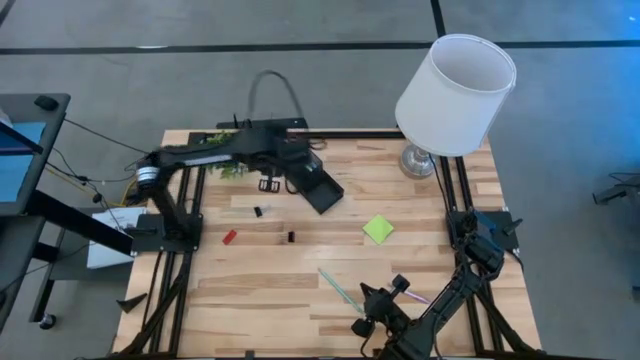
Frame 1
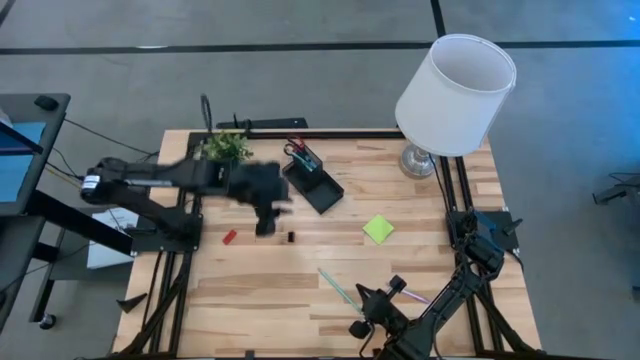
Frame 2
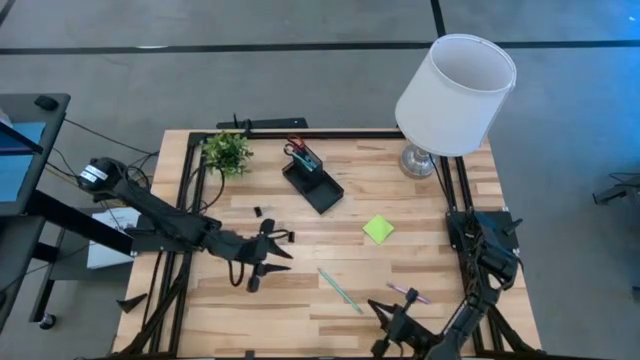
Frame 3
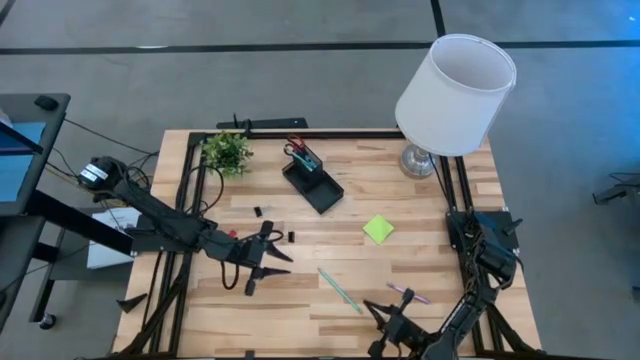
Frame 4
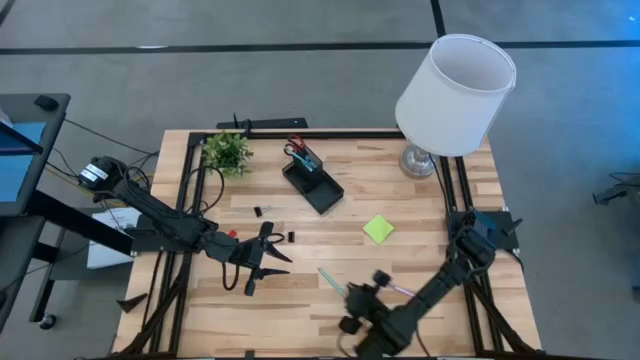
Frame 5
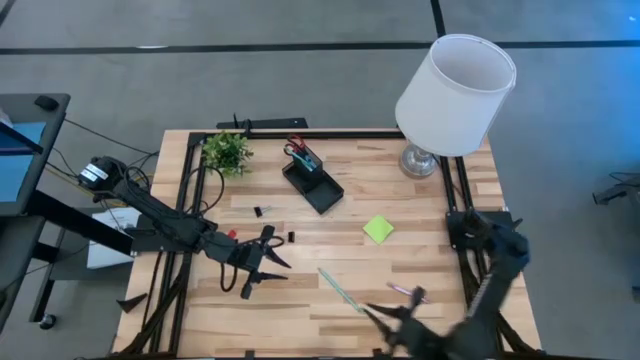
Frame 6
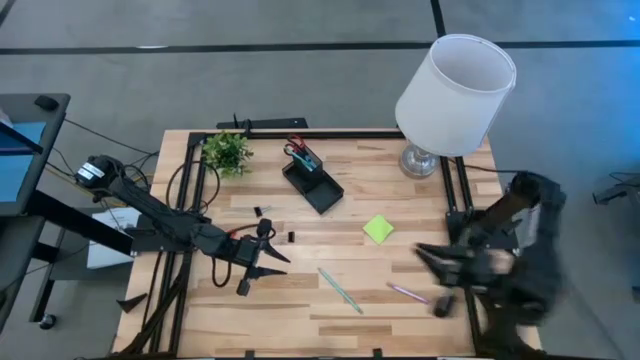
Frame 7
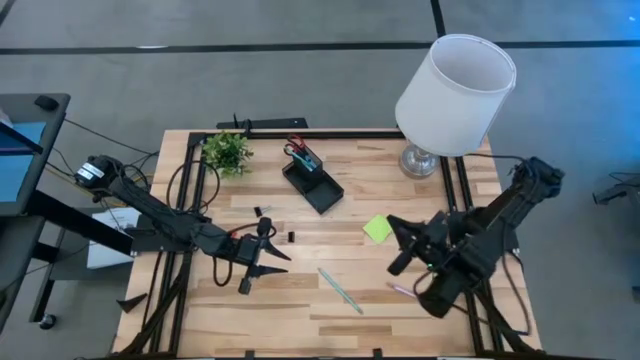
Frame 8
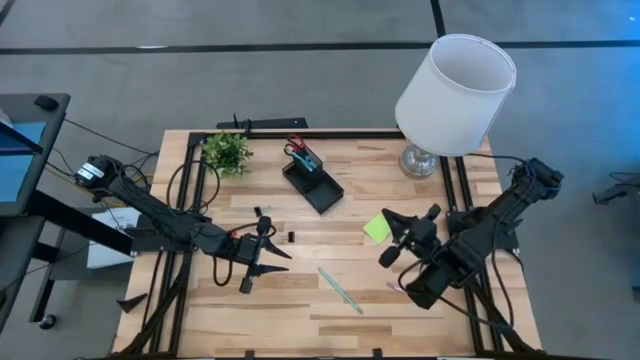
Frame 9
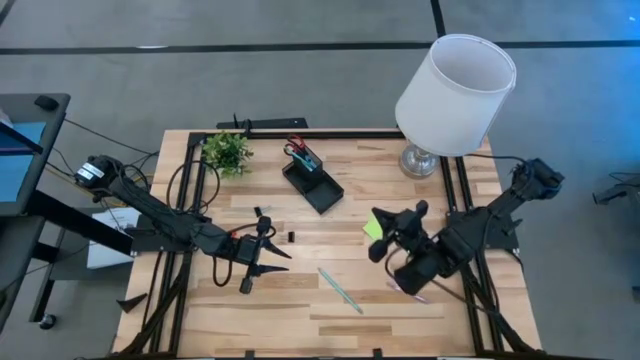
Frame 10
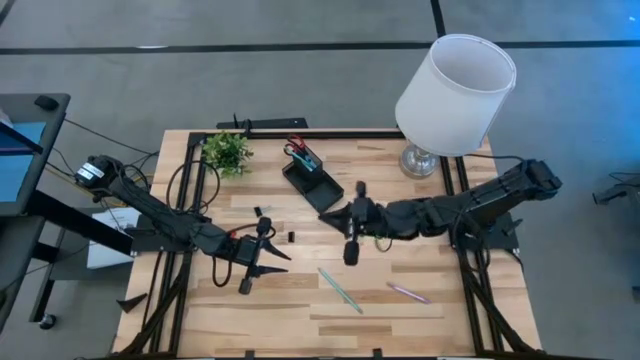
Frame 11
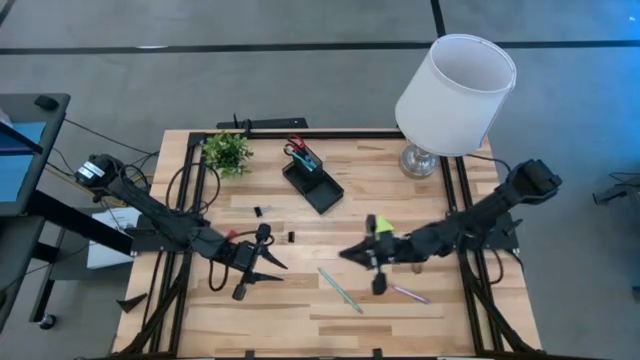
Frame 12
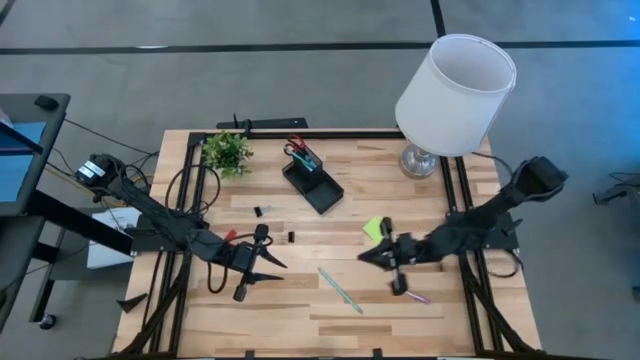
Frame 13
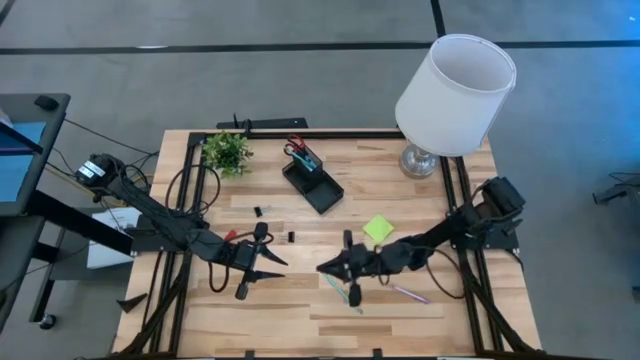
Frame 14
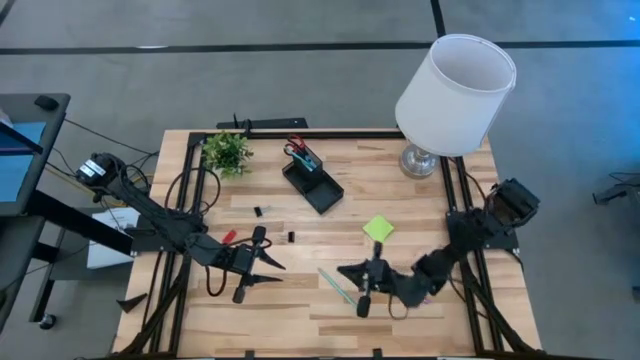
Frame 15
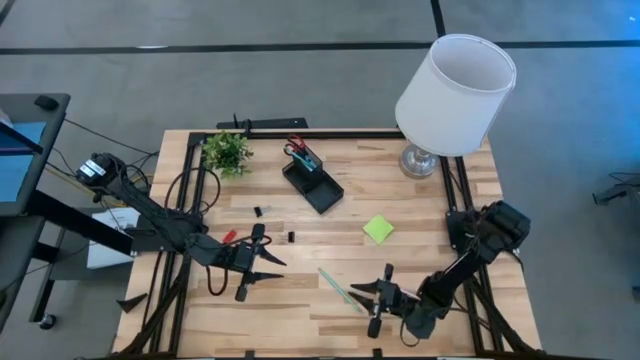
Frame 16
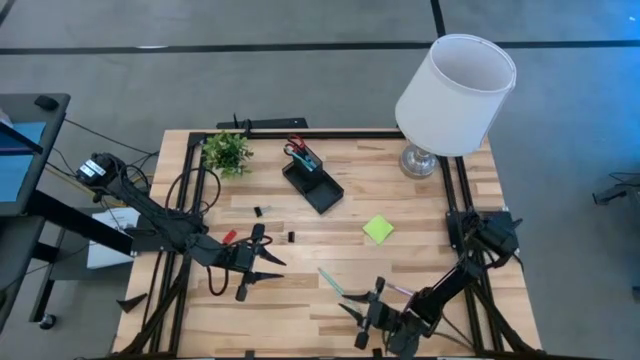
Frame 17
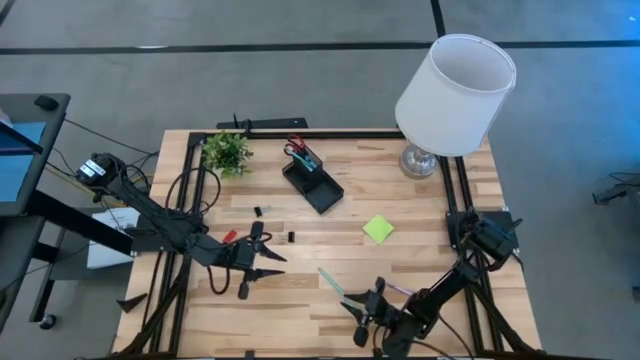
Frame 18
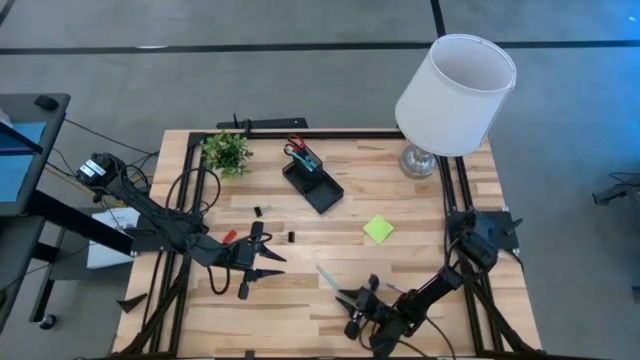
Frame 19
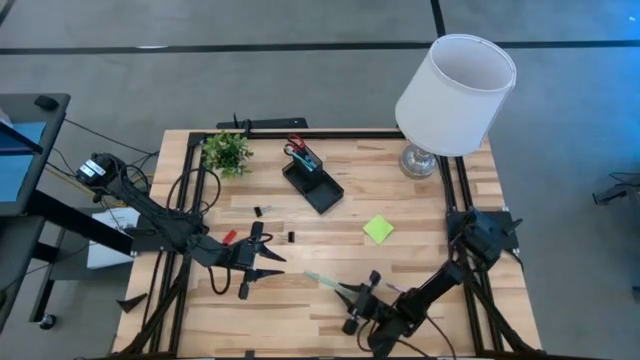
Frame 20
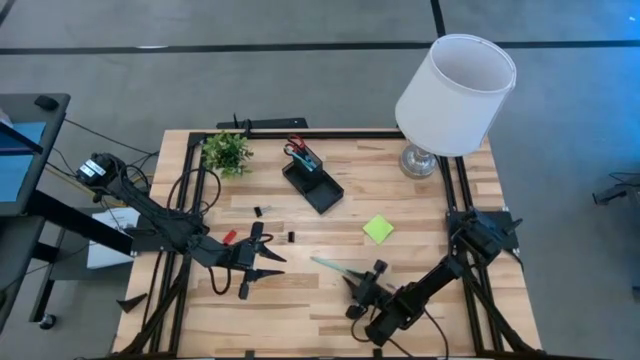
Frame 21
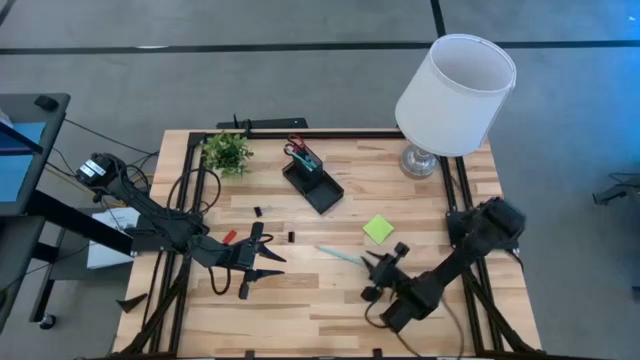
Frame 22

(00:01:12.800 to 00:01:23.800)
Task: Pick and place office supplies into organizer
Put the blue pencil into the desk organizer

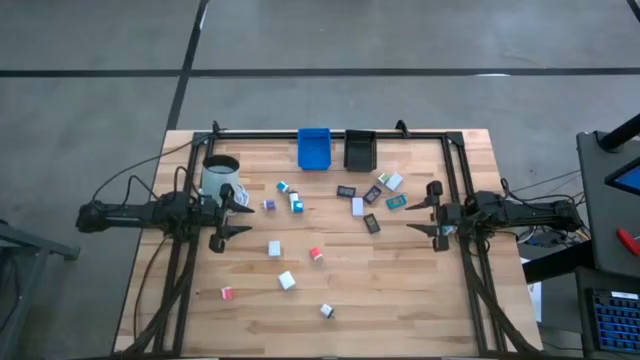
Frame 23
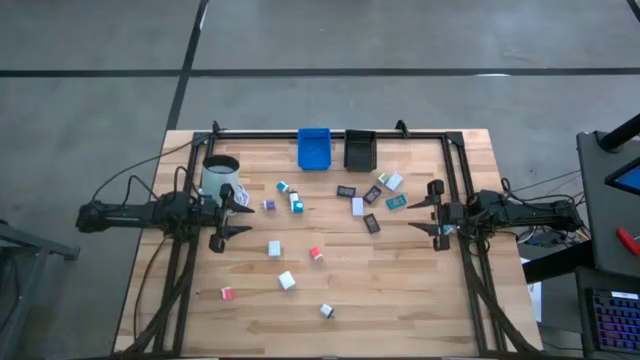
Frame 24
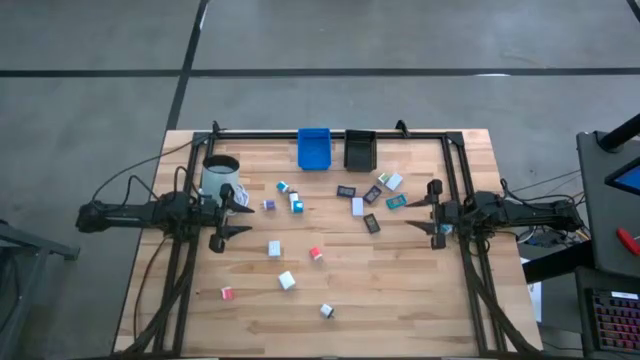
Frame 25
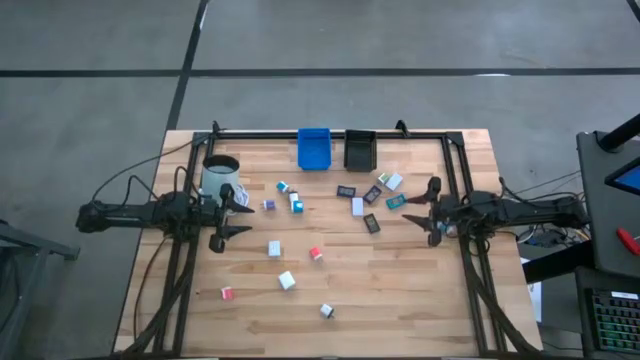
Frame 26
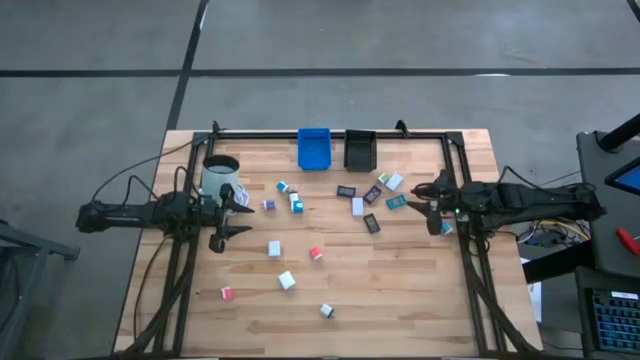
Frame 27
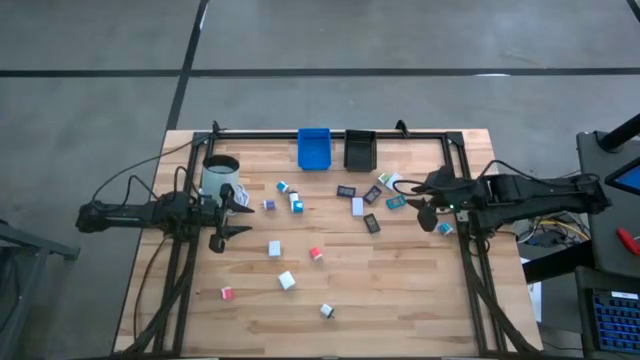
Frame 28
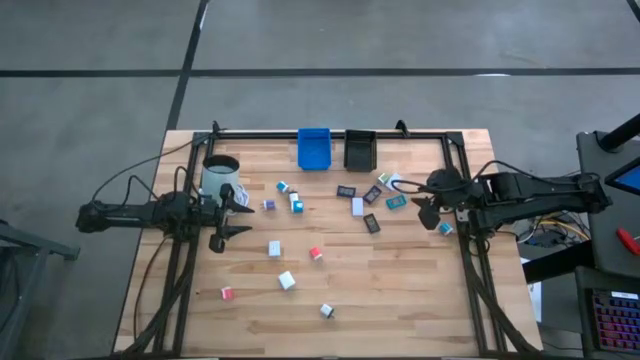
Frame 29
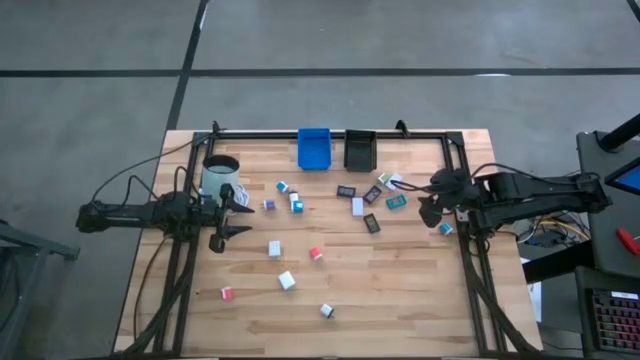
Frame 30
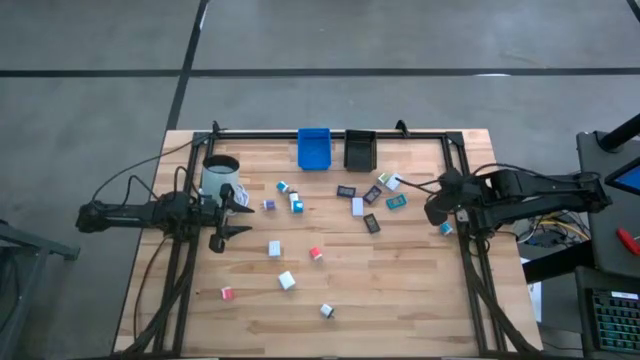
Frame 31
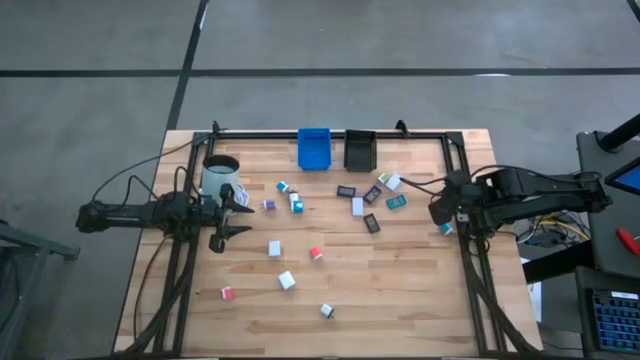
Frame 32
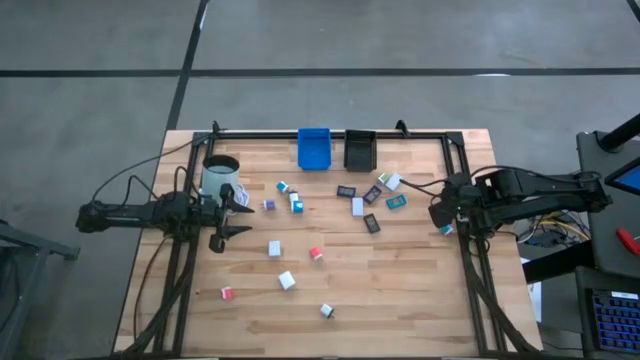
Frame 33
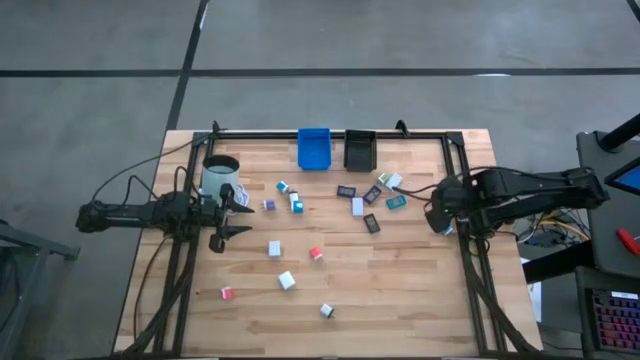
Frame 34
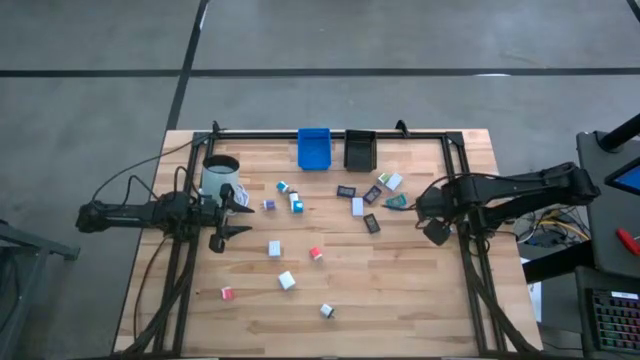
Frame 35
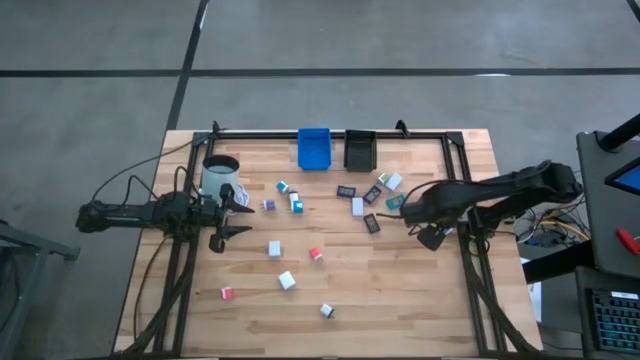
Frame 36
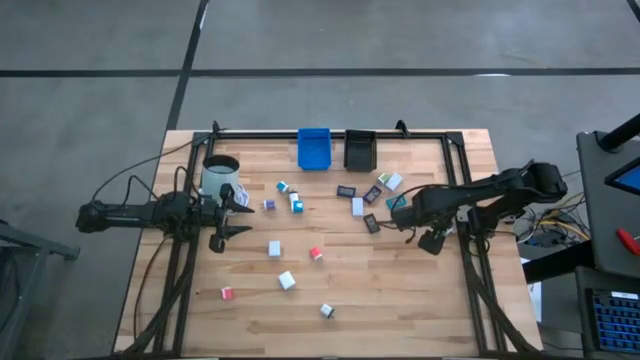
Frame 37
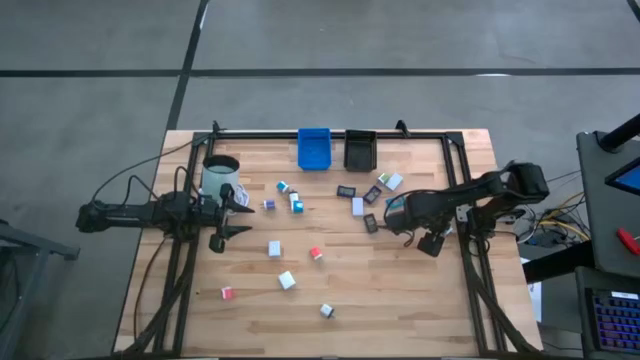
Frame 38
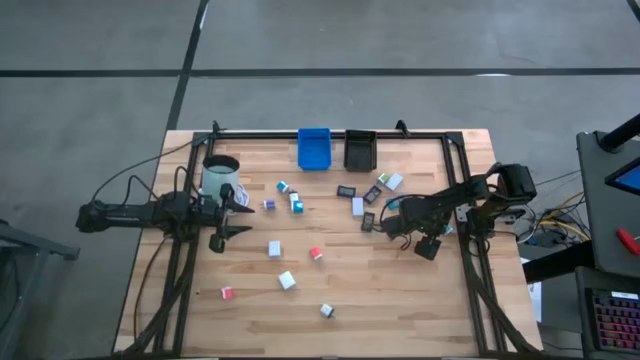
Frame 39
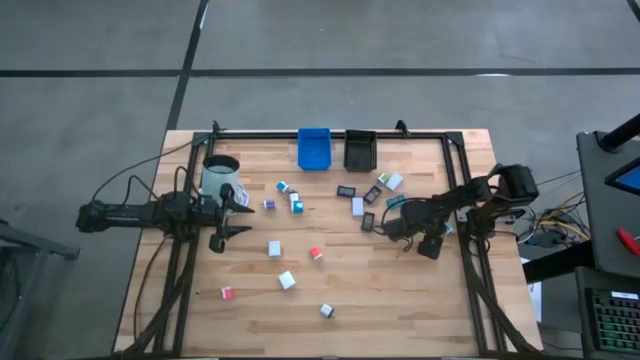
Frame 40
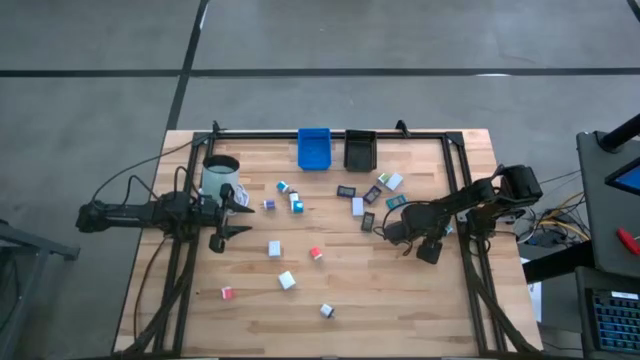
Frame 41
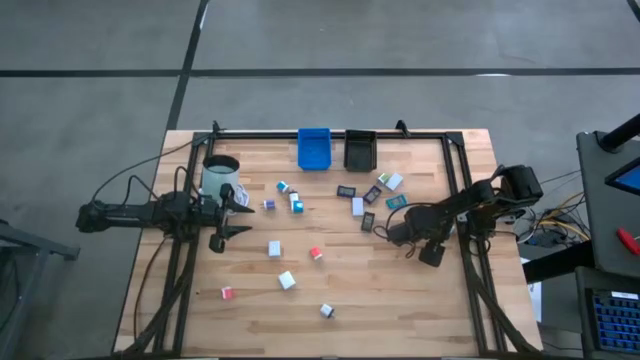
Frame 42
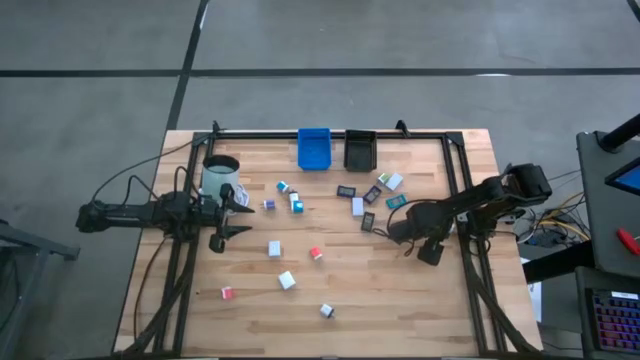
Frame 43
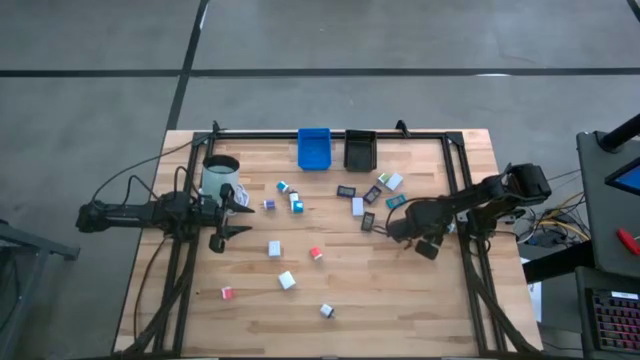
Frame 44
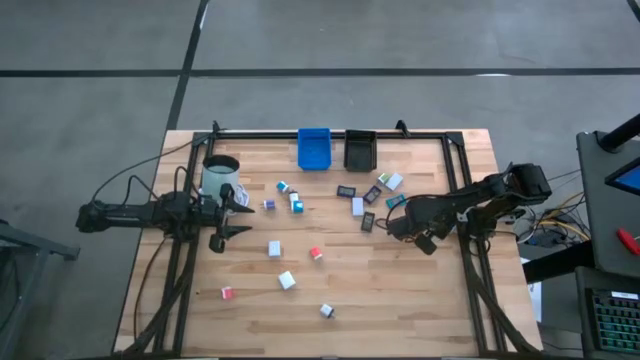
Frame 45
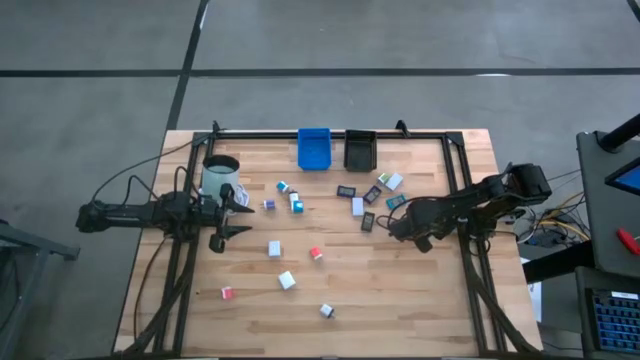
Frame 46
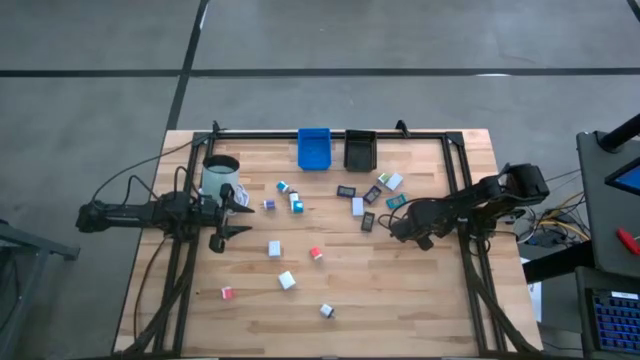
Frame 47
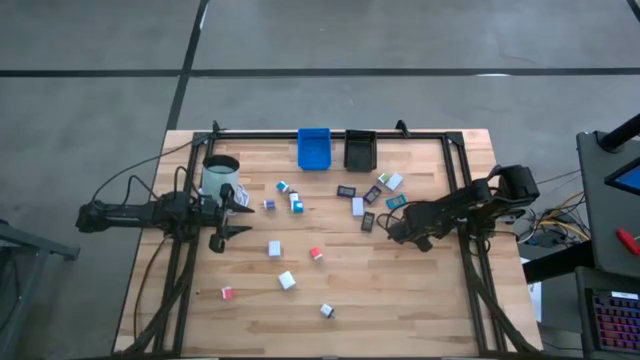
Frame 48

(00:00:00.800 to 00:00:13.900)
Task: Pick & Place Office items
Put the right small blue adapter into the blue basket
